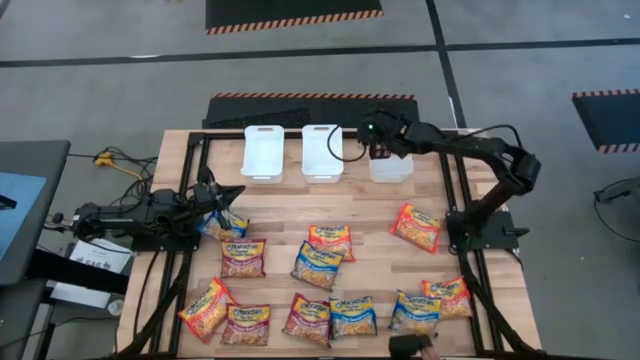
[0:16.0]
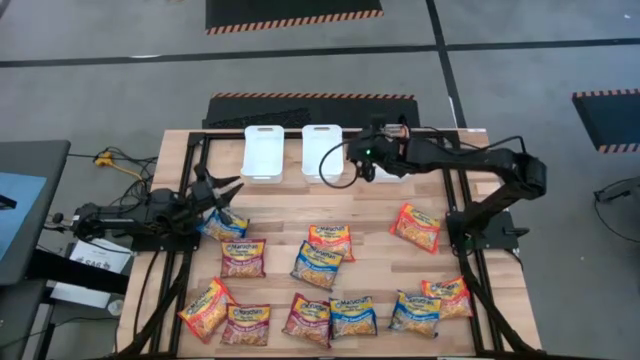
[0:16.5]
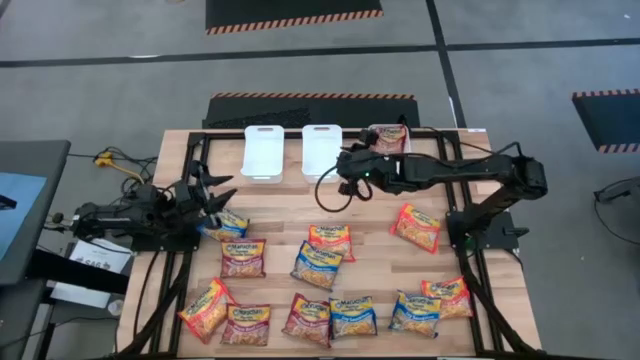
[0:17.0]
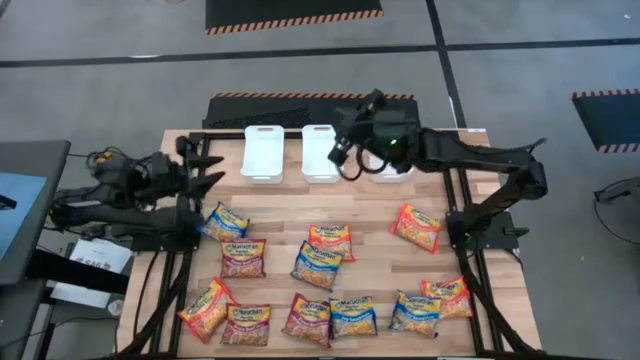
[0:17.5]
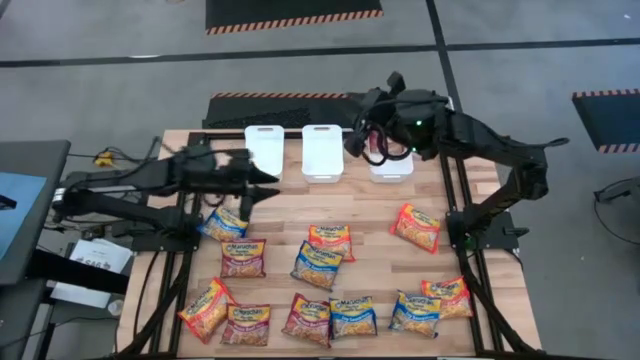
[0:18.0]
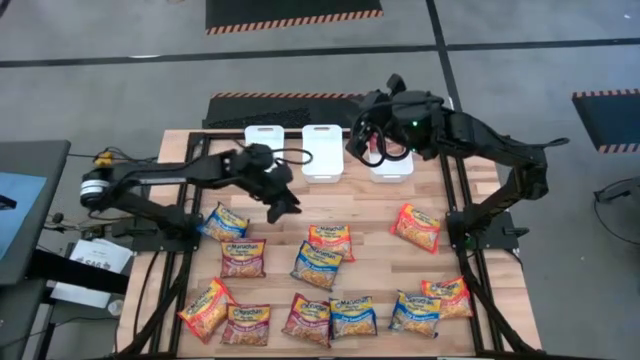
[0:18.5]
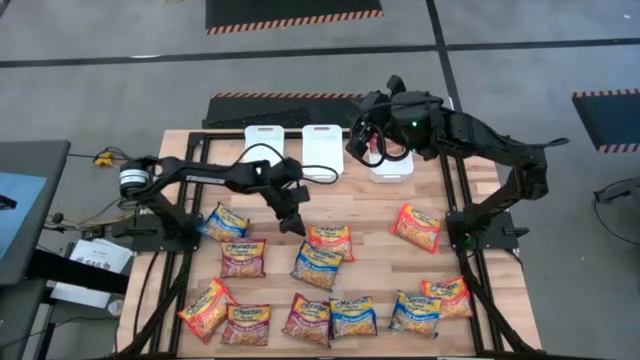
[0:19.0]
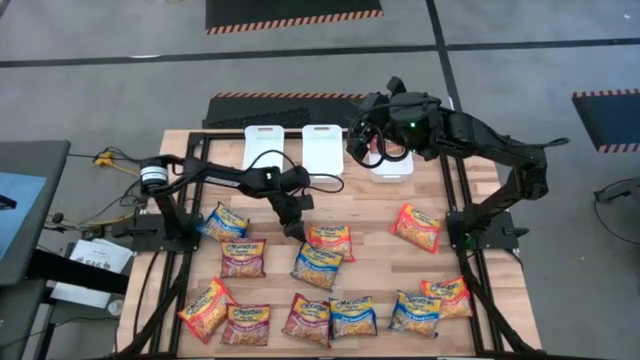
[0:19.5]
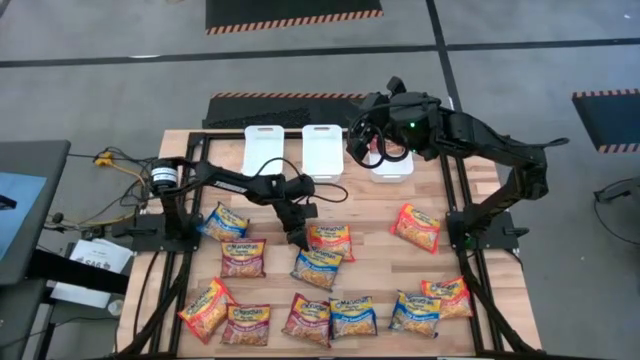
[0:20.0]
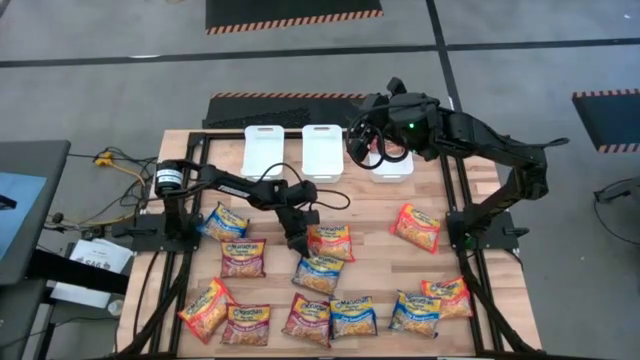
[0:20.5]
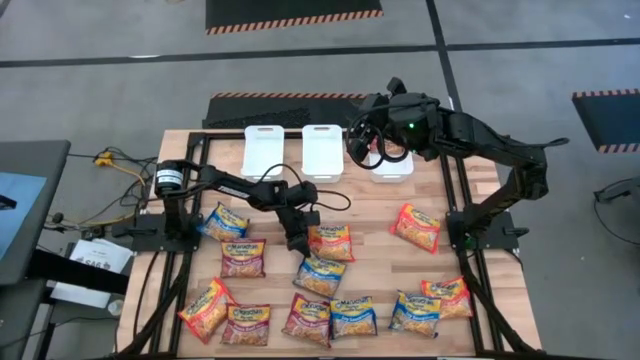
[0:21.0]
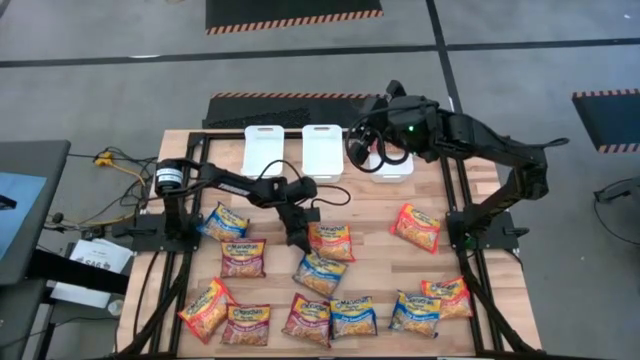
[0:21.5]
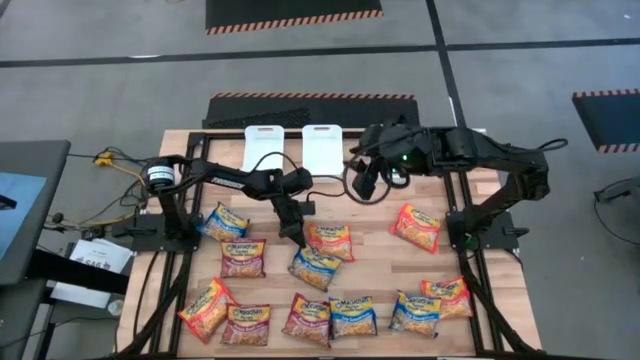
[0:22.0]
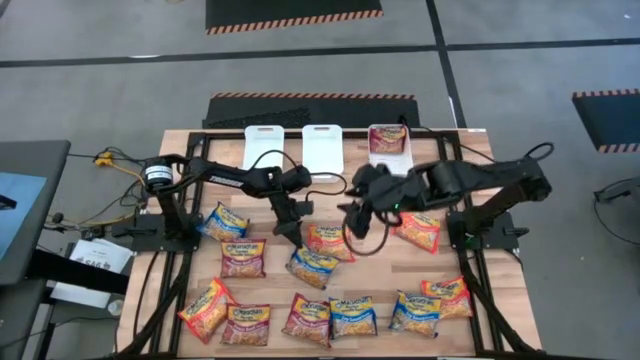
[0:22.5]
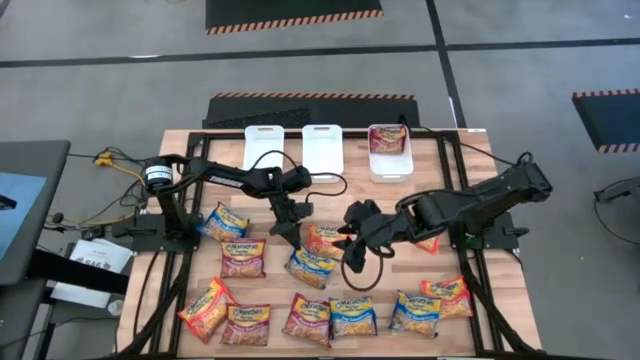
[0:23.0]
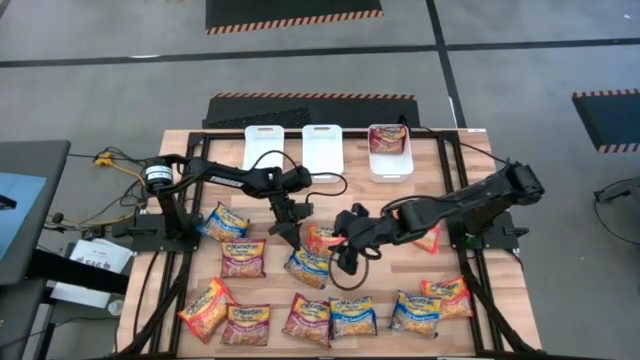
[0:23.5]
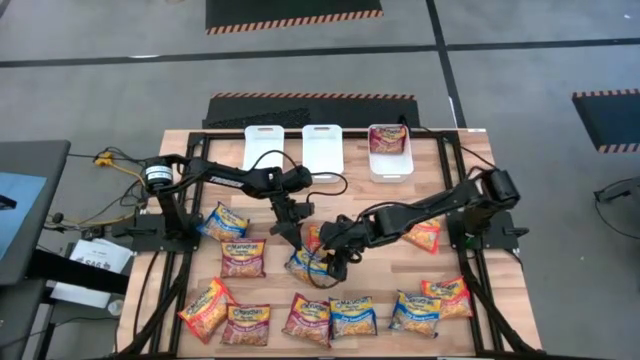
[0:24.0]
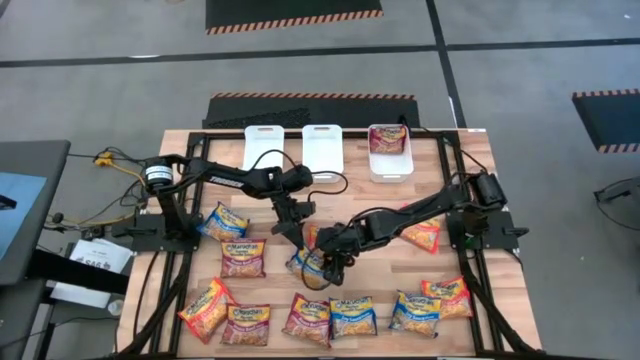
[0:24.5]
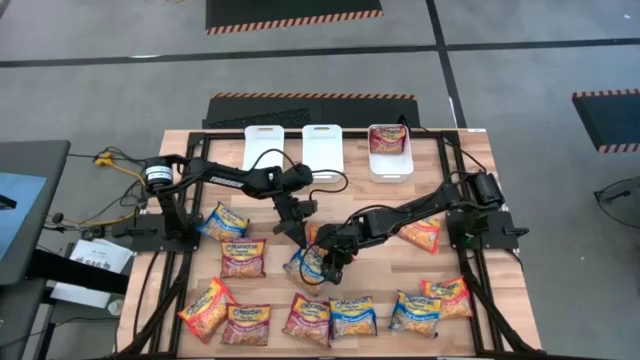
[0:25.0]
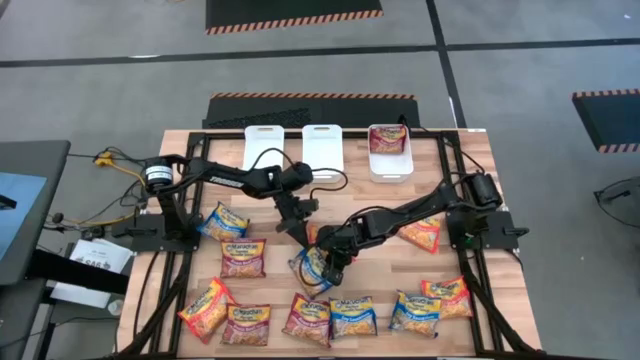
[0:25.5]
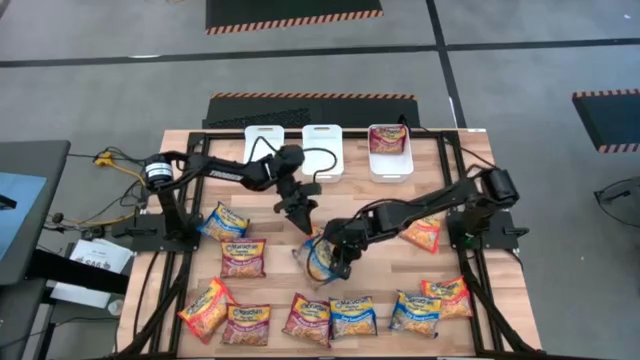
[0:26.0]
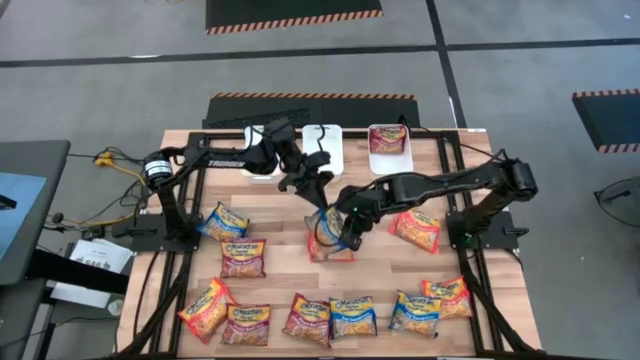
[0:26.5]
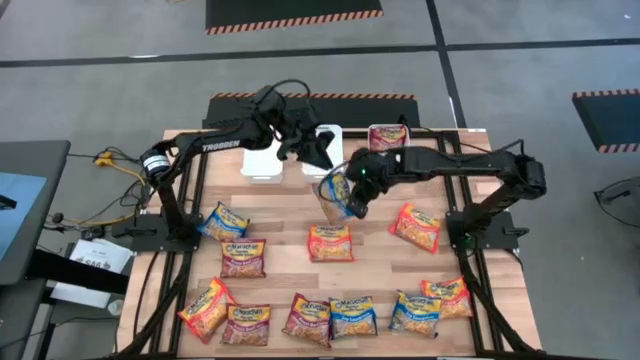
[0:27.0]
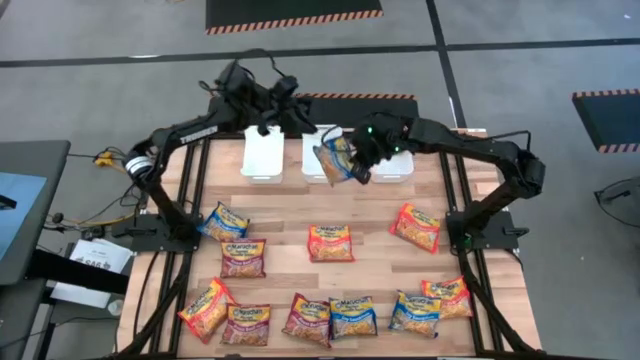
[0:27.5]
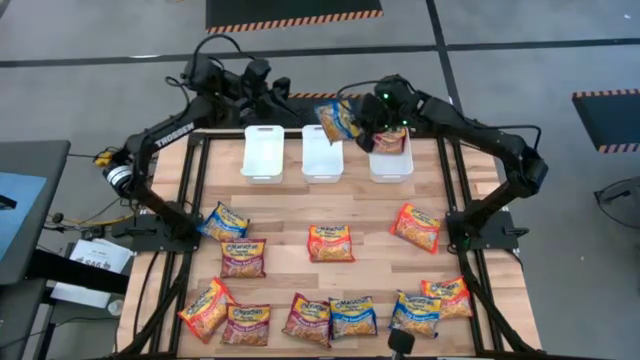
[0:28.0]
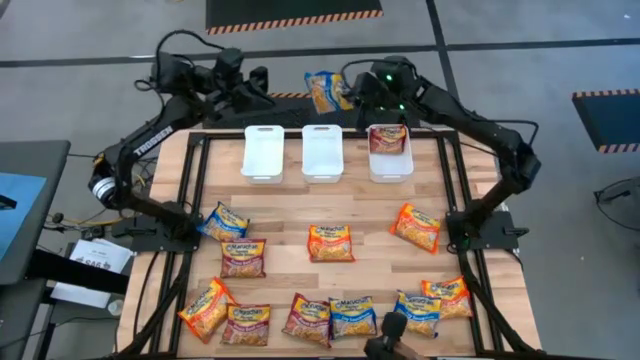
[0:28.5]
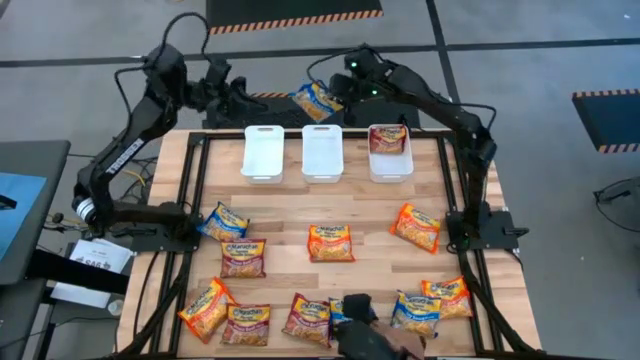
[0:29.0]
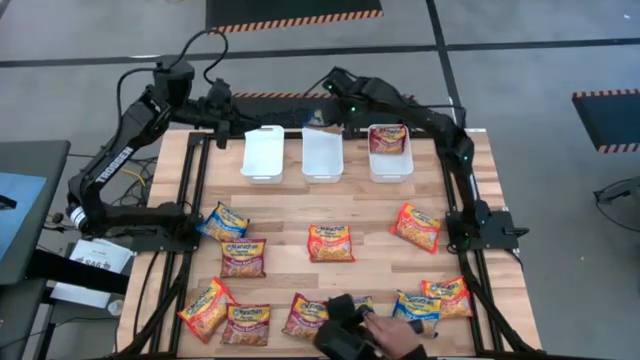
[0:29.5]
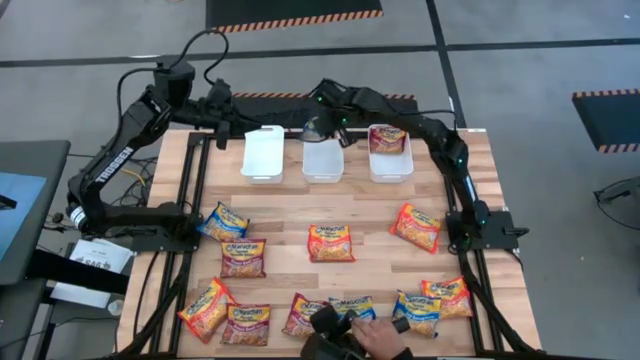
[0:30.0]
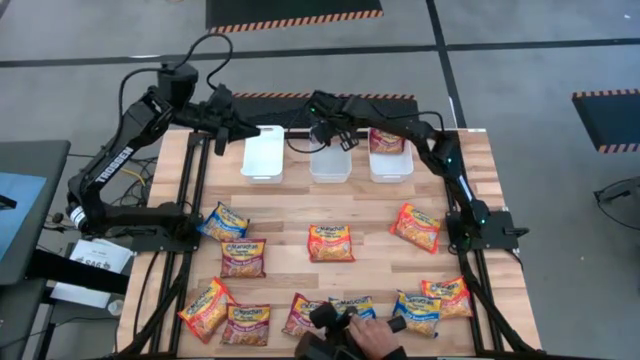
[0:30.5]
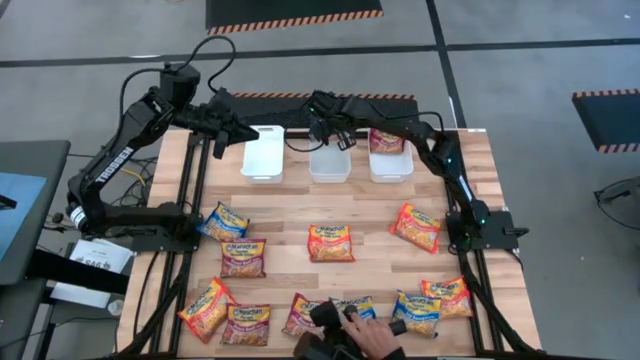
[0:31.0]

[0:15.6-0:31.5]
Task: Sort Maruchan noodles
Put the blue noodle pack into the middle white bin

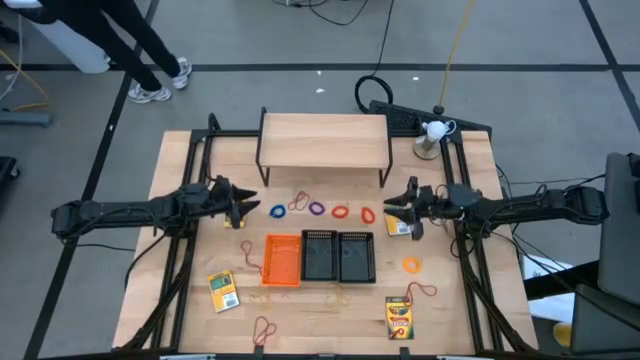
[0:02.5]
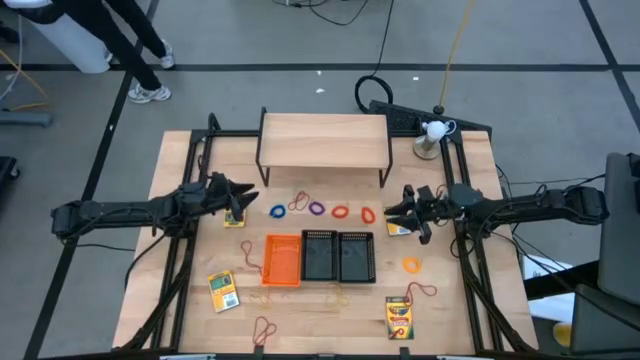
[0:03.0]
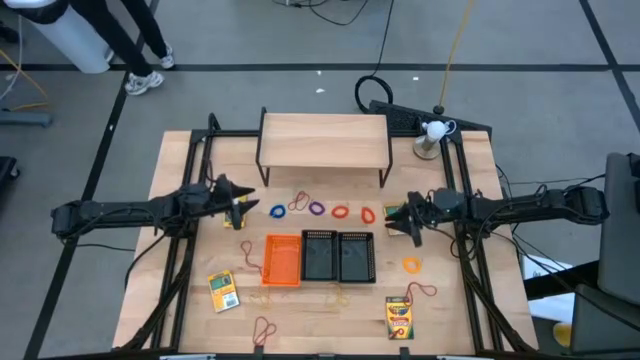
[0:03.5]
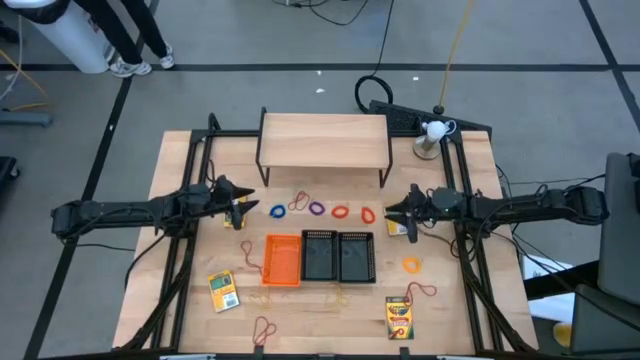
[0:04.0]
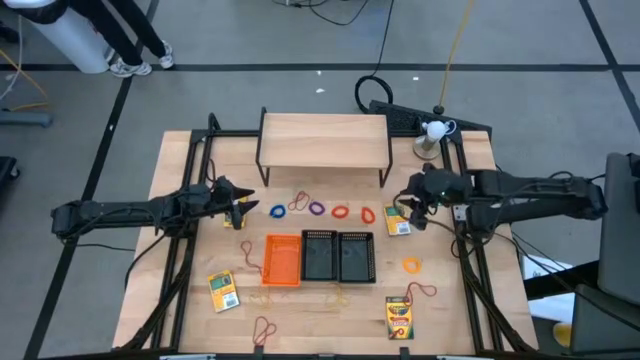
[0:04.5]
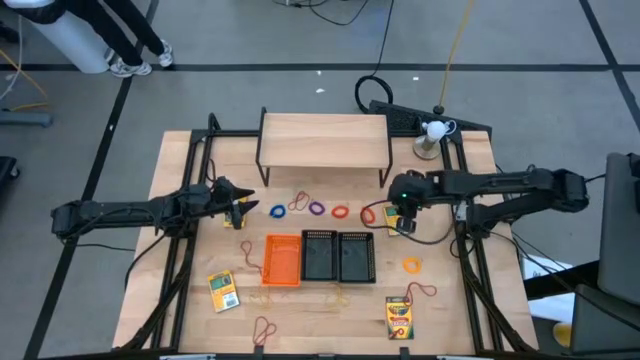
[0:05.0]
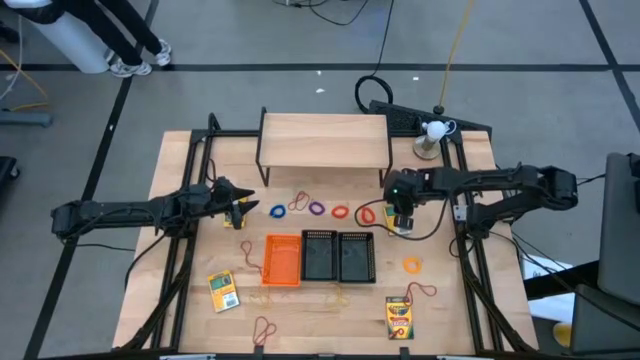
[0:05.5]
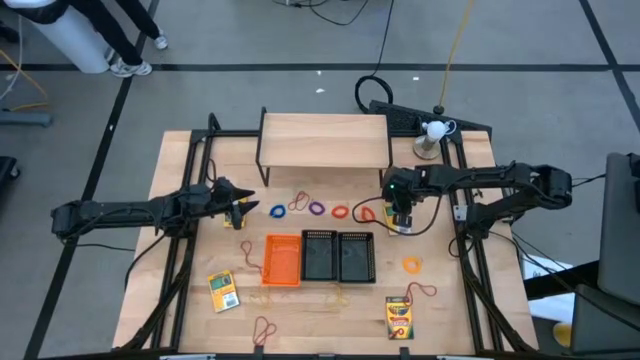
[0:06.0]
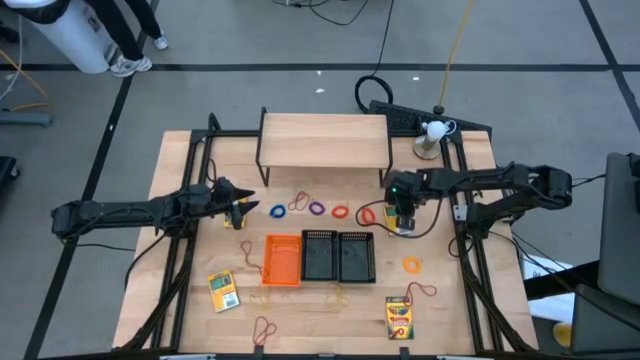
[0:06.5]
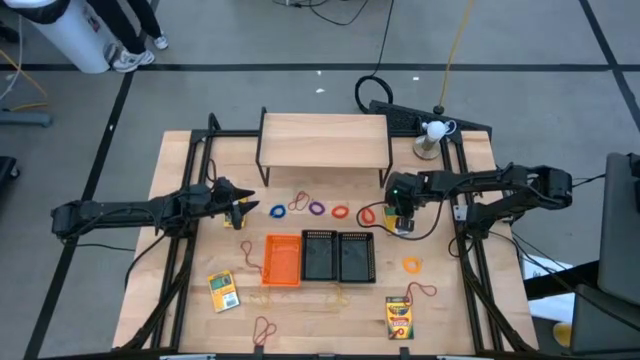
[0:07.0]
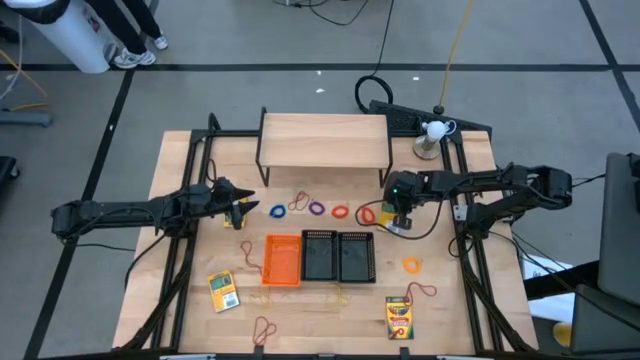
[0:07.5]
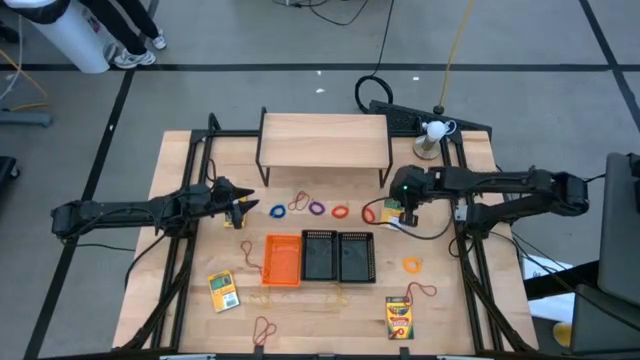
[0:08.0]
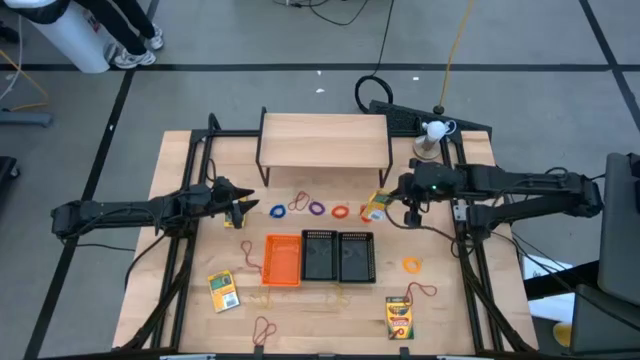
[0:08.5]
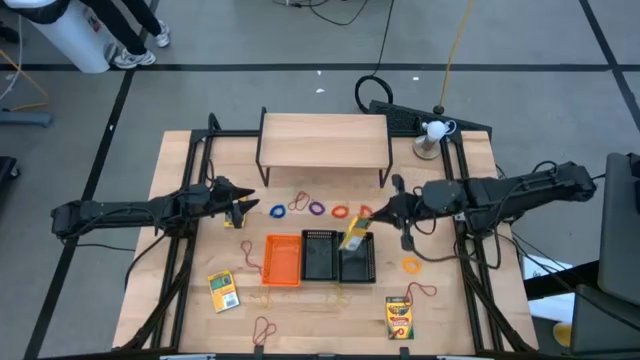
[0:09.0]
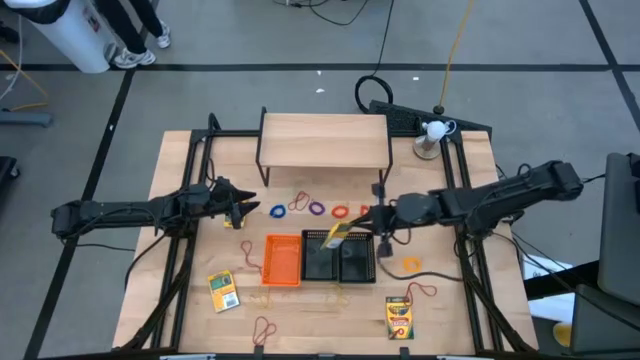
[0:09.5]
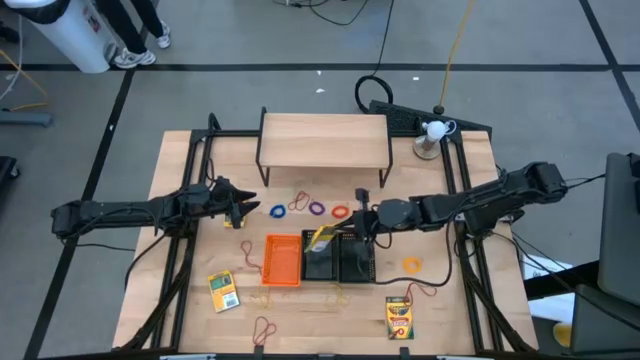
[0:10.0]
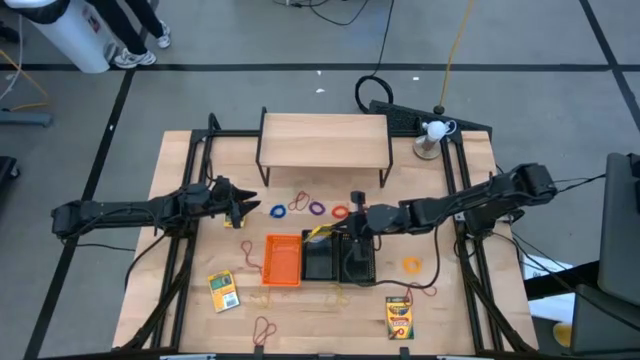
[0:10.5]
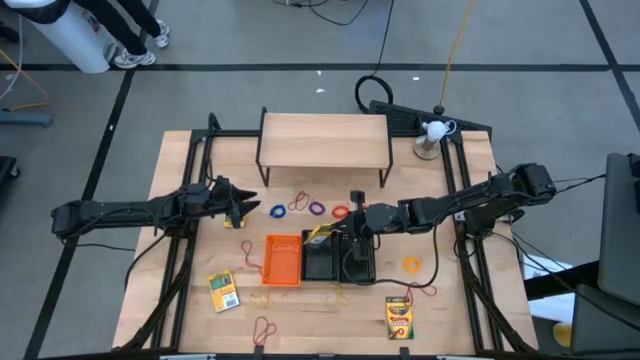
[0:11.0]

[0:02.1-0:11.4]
Task: Pick & Place Office Desk Supplies
Put the crayon box into the left black bin
